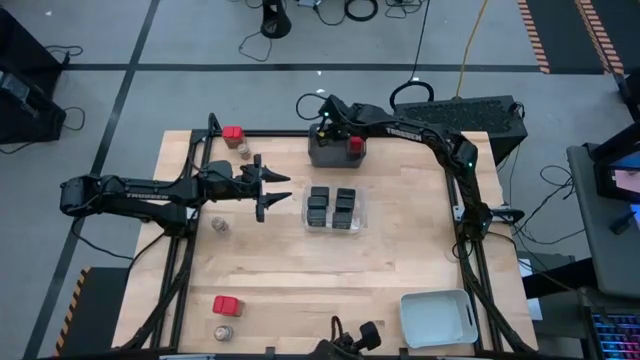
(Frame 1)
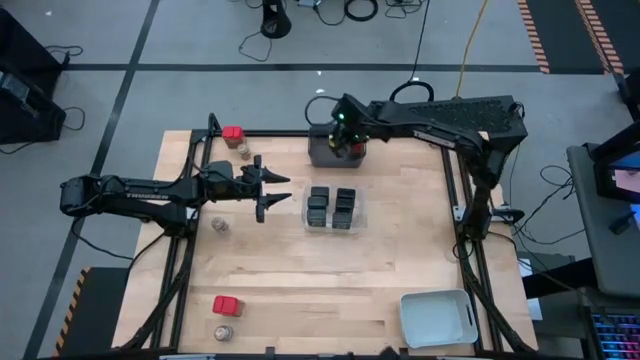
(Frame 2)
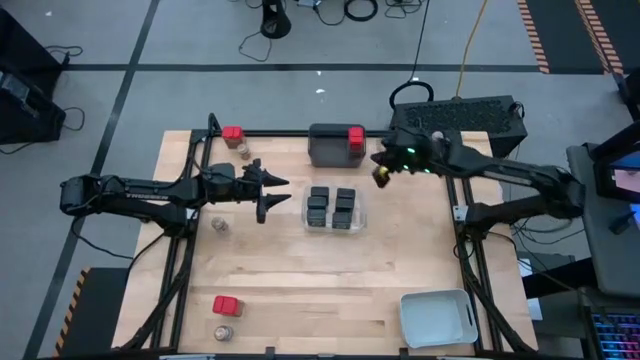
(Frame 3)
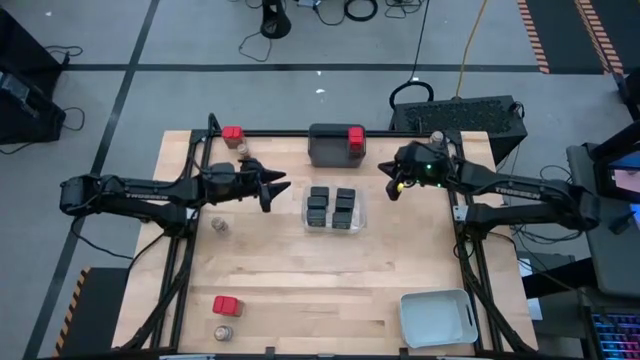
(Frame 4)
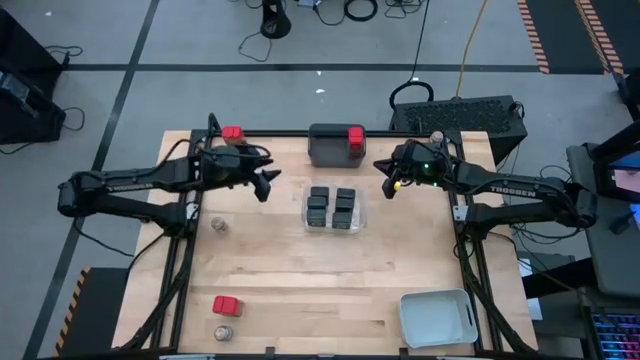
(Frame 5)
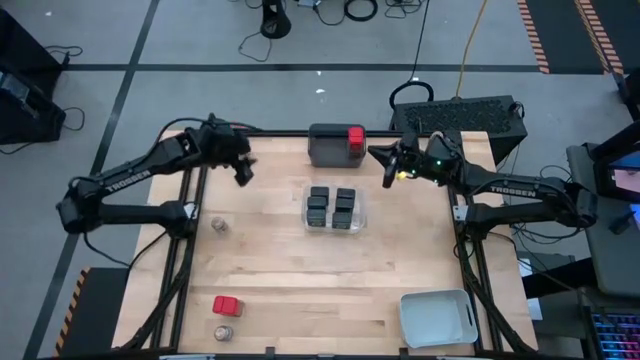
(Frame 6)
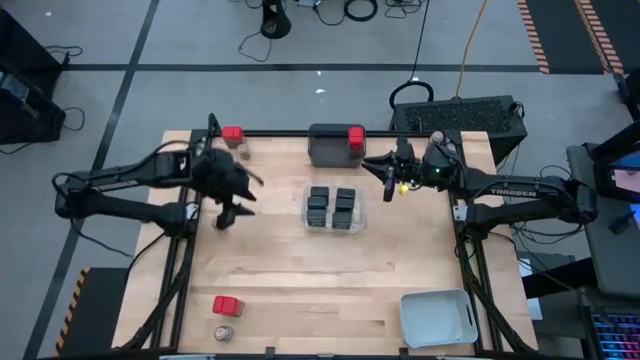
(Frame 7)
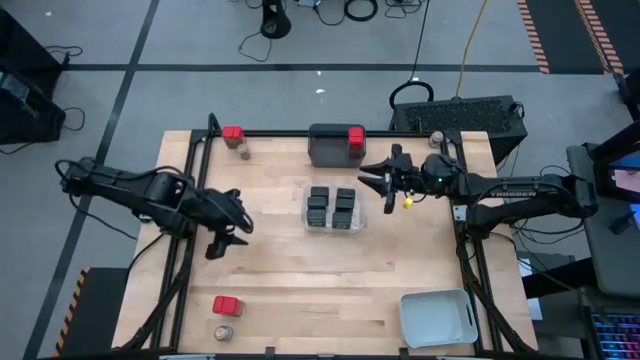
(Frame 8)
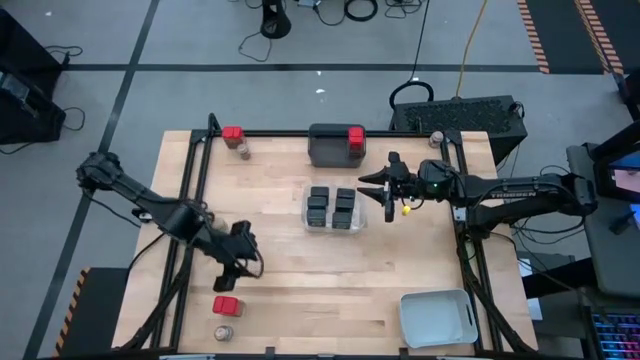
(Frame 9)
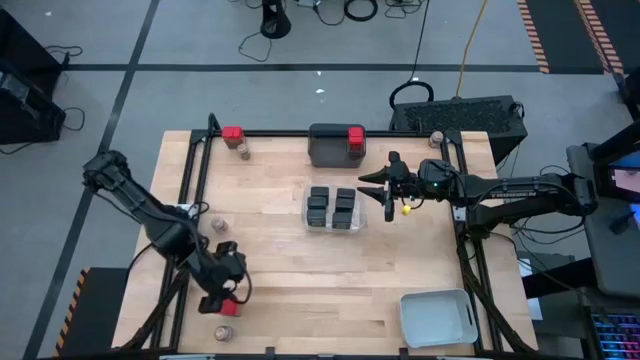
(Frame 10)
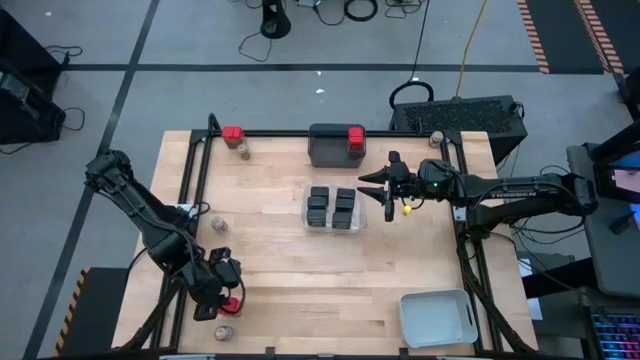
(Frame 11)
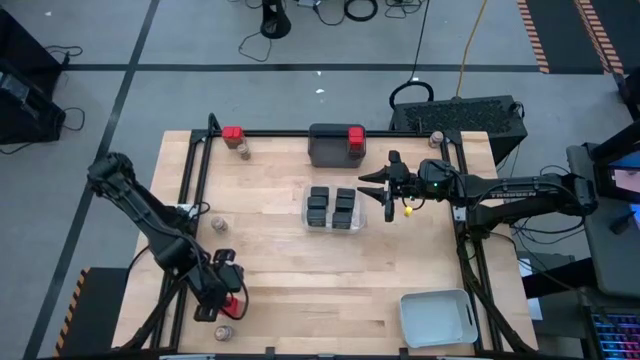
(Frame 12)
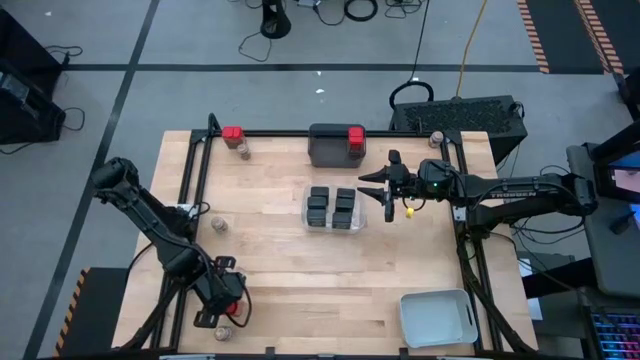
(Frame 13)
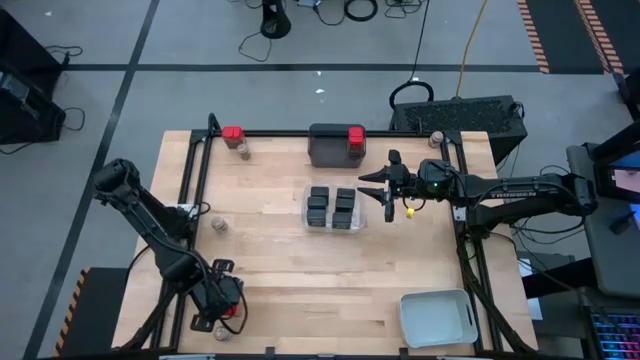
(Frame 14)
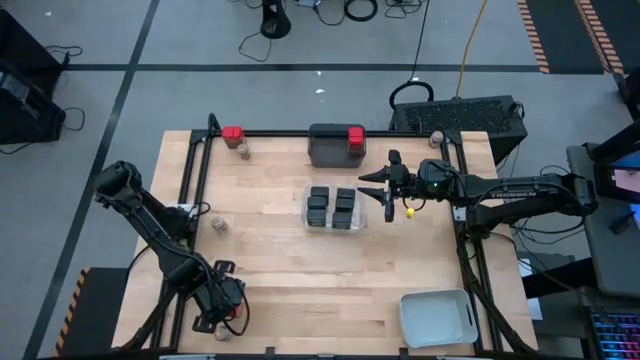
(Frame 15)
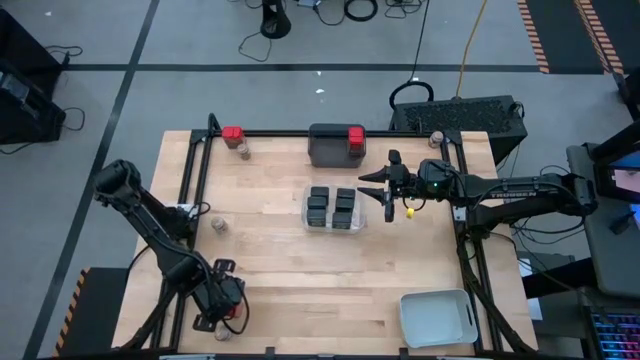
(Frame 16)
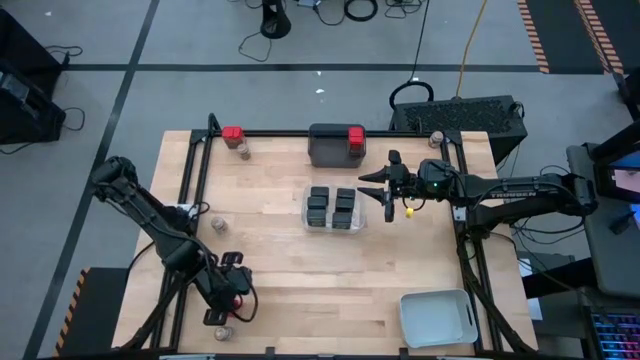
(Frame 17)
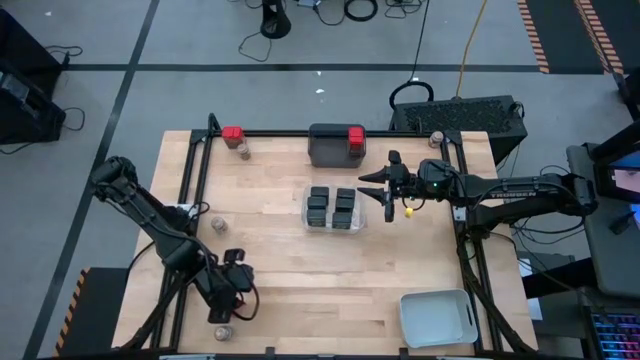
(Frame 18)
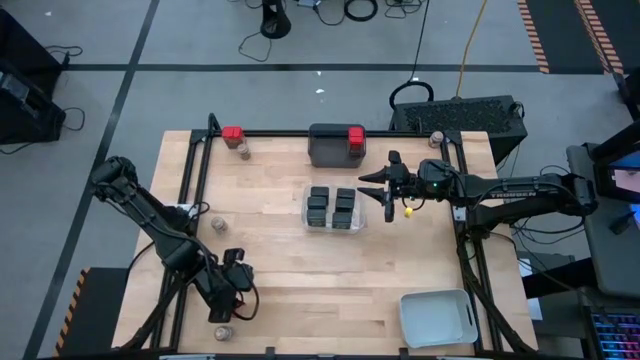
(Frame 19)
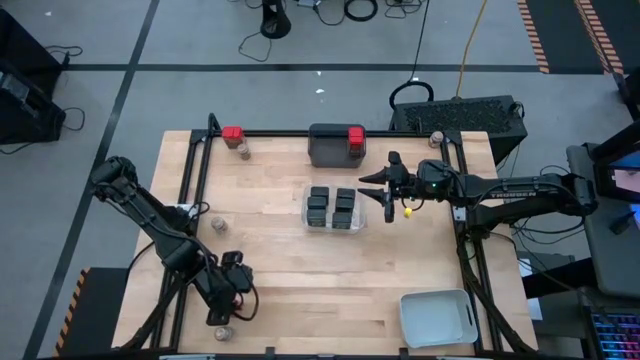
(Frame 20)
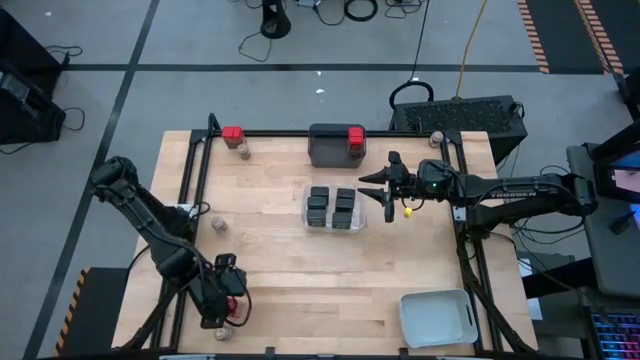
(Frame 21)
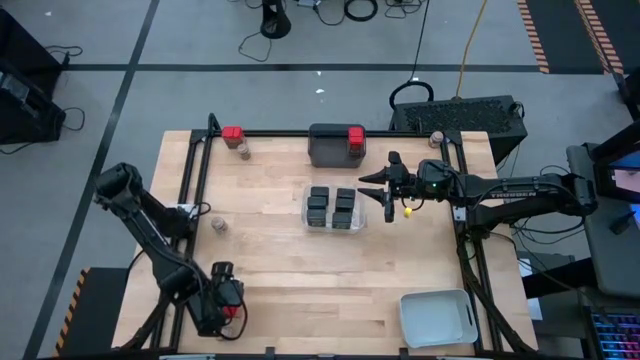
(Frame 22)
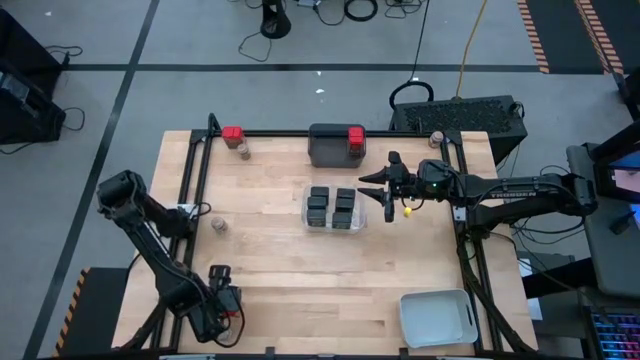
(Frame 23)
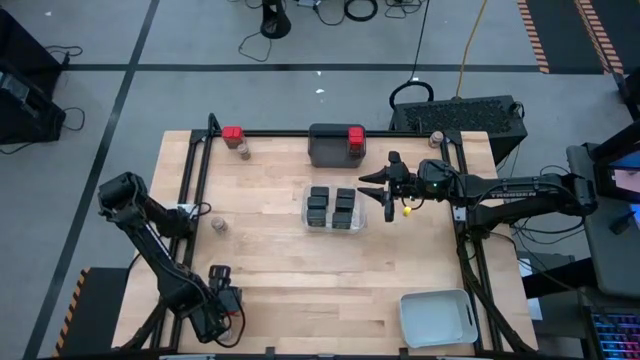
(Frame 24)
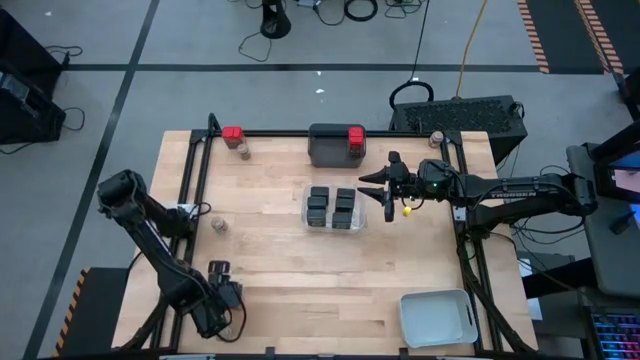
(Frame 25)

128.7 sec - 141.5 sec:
Task: Sort spices by type
Put the red seasoning bottle into the gray bin

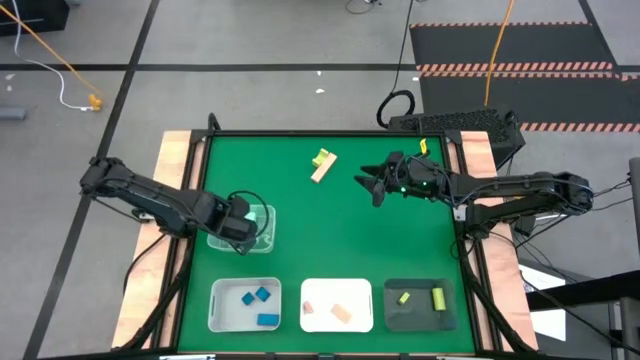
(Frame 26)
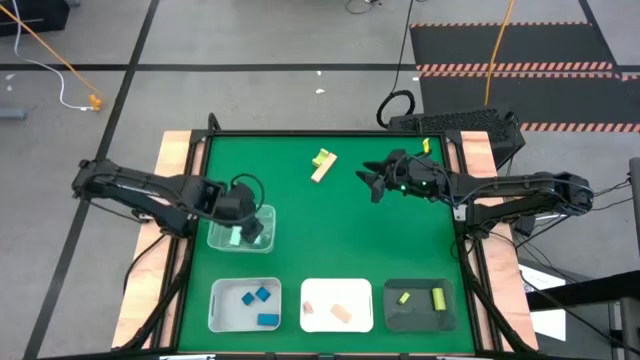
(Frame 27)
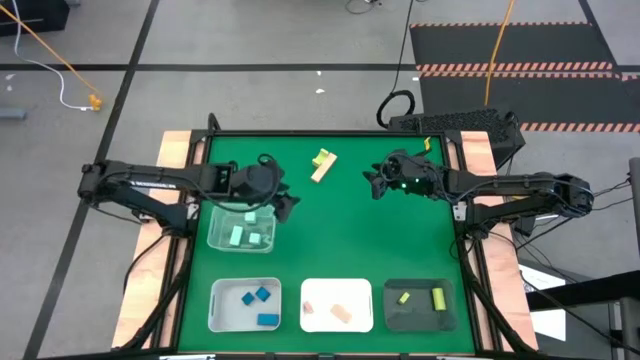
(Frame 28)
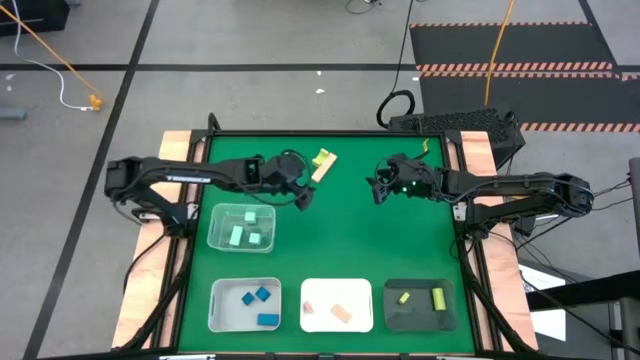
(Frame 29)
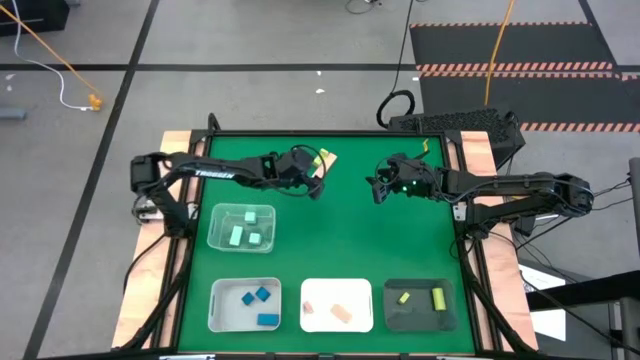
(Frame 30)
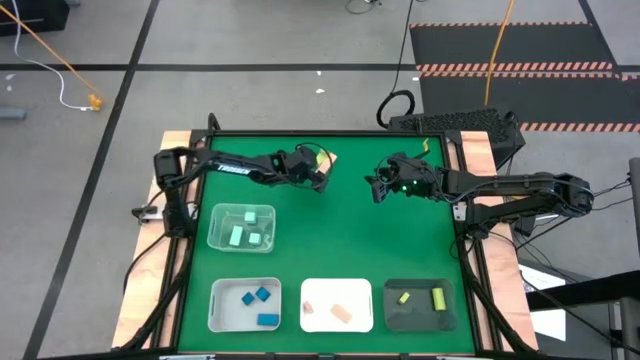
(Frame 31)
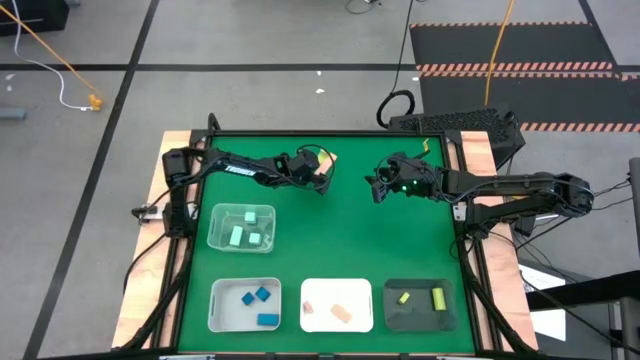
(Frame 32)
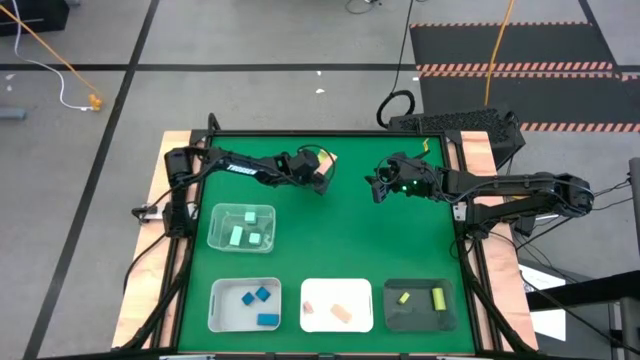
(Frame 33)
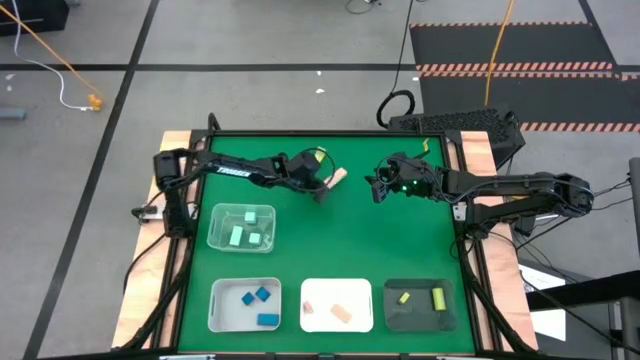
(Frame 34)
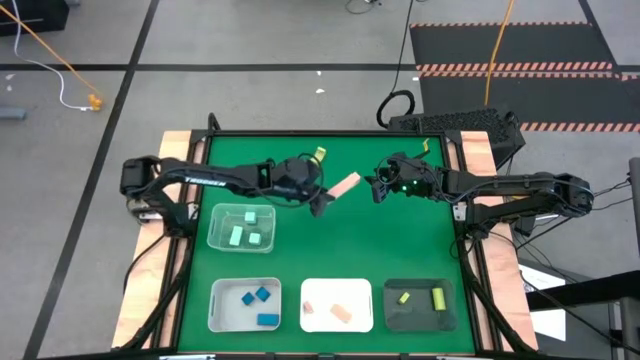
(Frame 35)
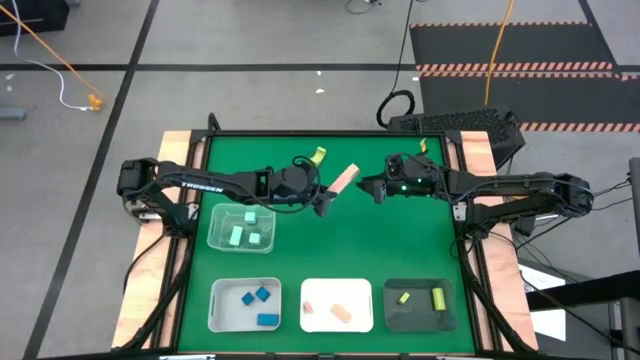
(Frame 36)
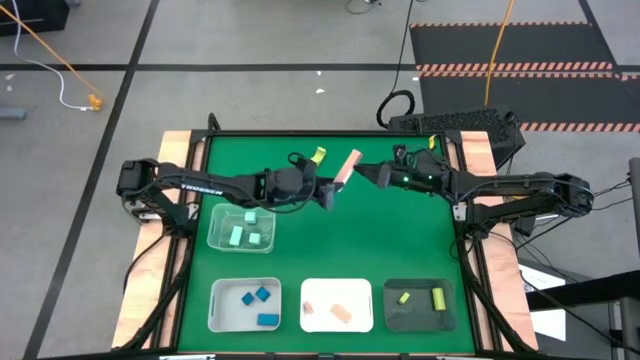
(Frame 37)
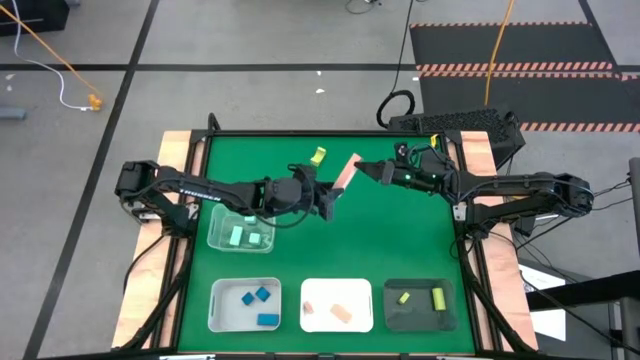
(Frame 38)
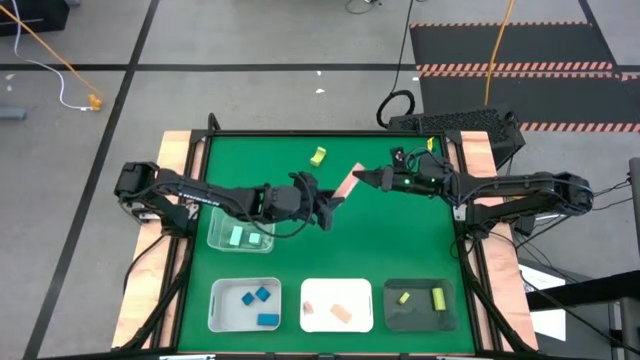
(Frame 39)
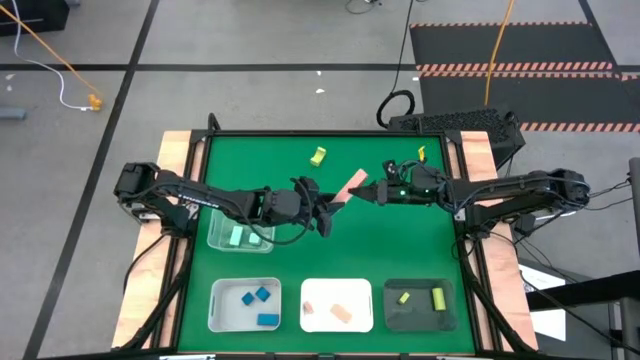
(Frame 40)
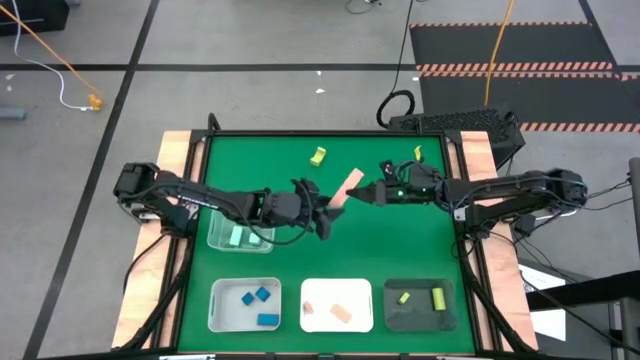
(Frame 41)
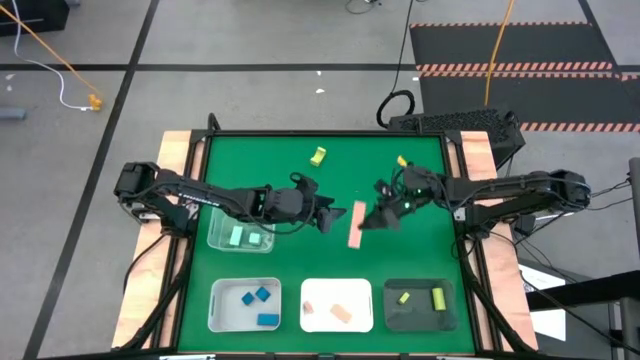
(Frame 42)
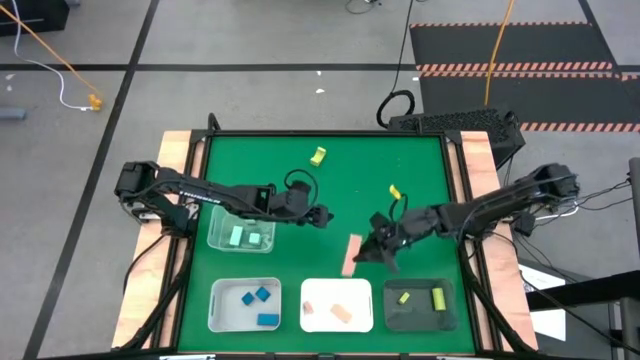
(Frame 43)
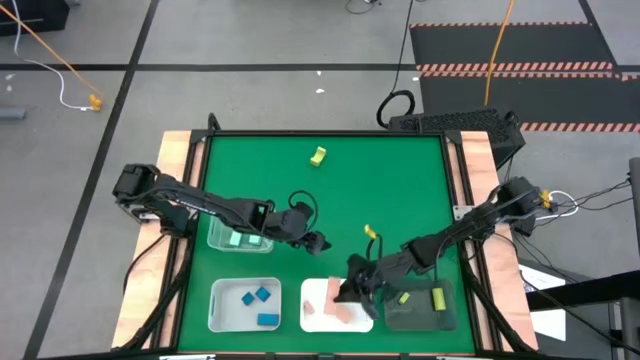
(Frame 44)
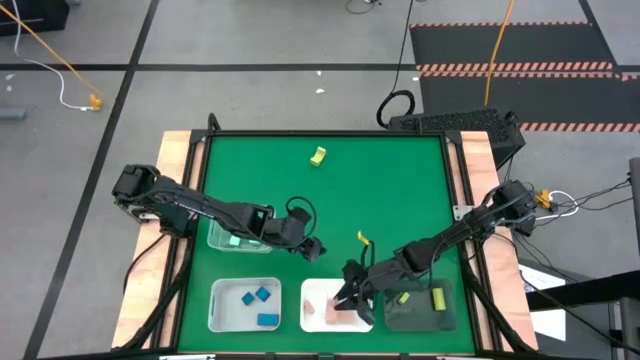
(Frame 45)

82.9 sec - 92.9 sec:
Task: Sort & place blocks by color
Put the pink block into the white bin
